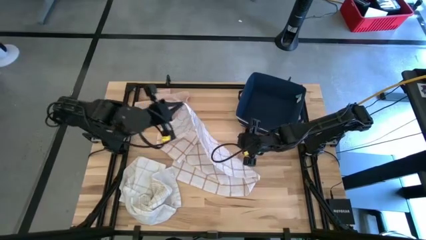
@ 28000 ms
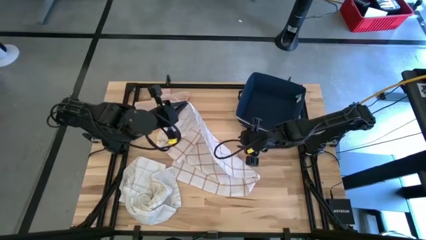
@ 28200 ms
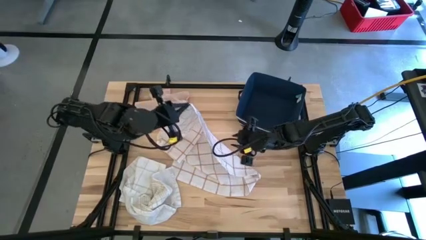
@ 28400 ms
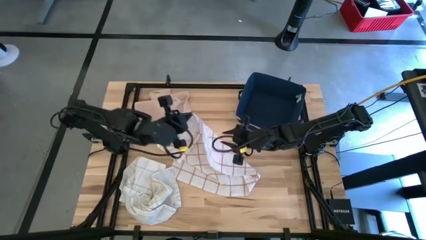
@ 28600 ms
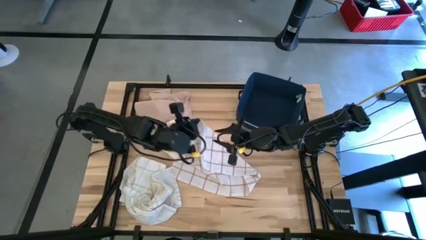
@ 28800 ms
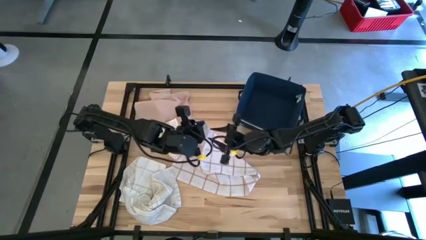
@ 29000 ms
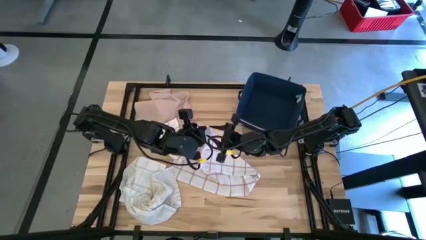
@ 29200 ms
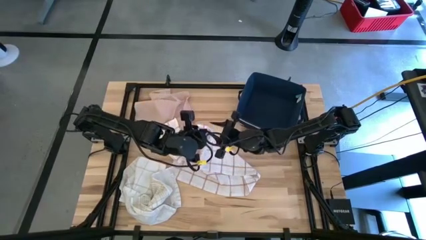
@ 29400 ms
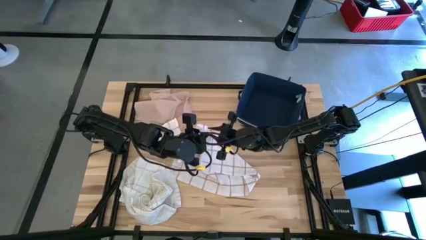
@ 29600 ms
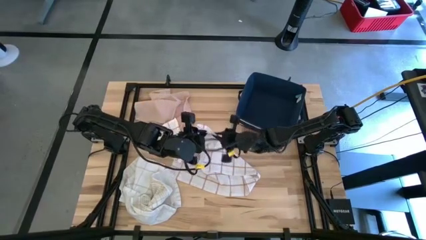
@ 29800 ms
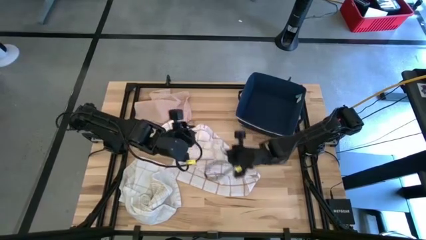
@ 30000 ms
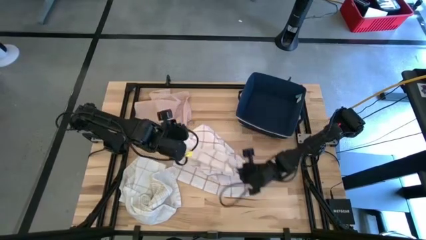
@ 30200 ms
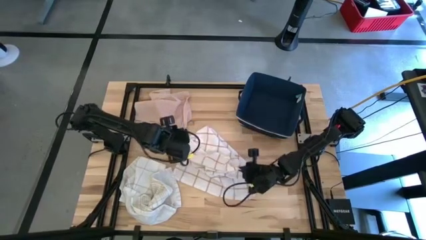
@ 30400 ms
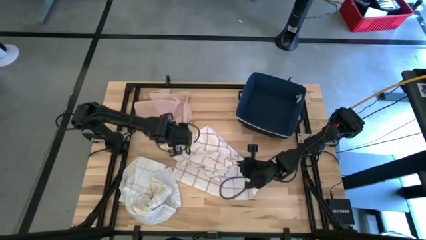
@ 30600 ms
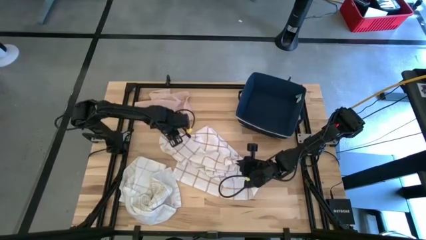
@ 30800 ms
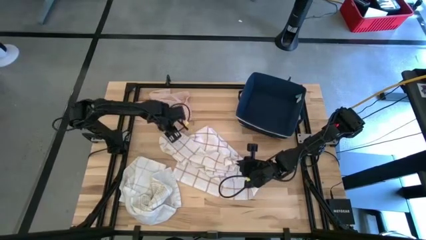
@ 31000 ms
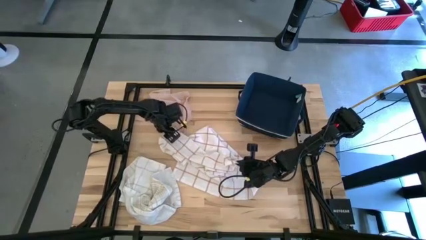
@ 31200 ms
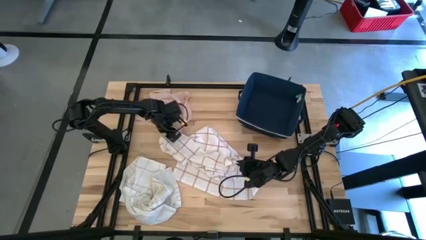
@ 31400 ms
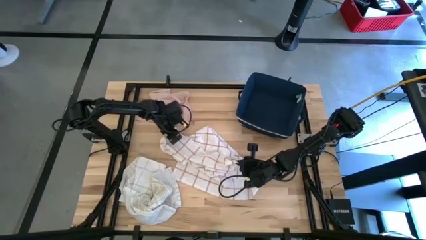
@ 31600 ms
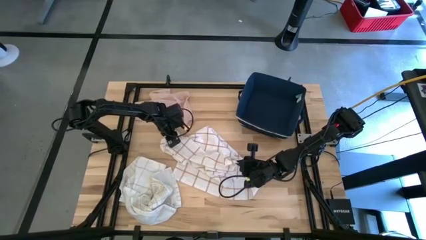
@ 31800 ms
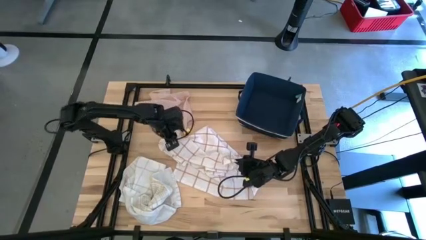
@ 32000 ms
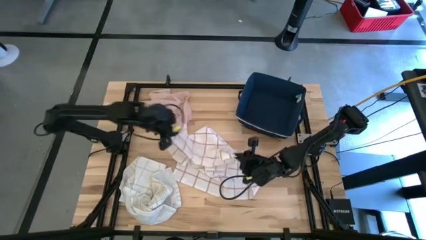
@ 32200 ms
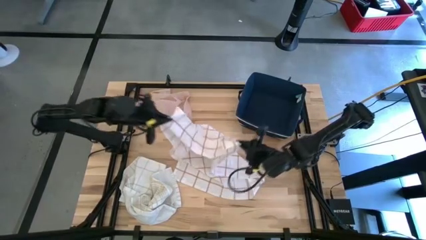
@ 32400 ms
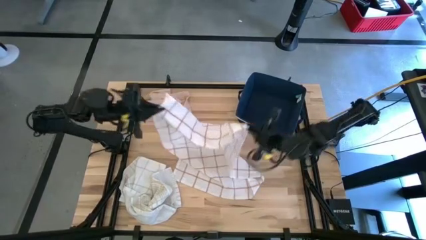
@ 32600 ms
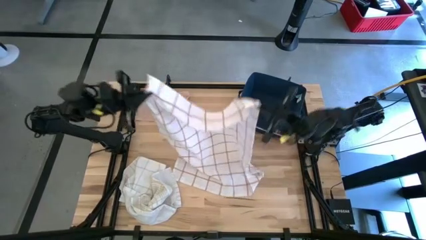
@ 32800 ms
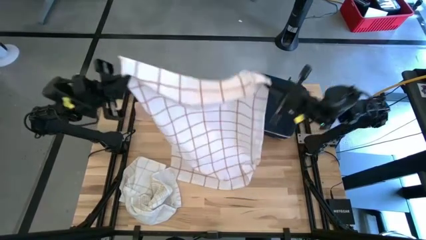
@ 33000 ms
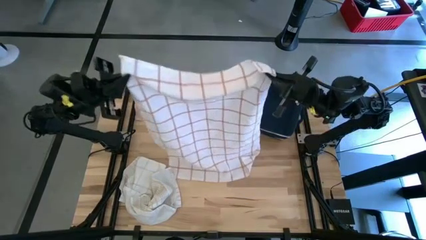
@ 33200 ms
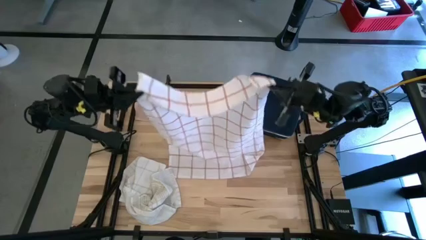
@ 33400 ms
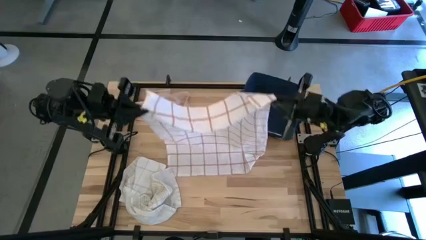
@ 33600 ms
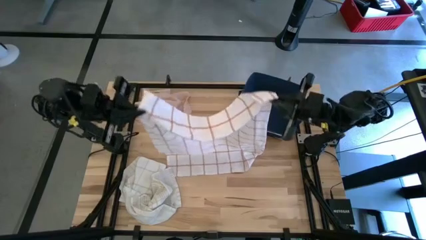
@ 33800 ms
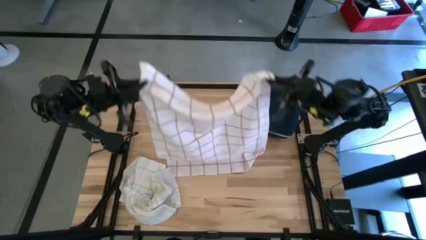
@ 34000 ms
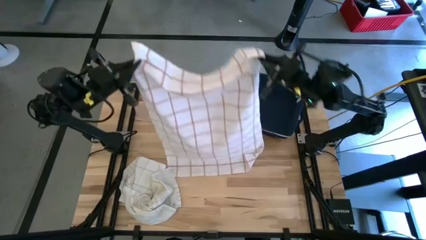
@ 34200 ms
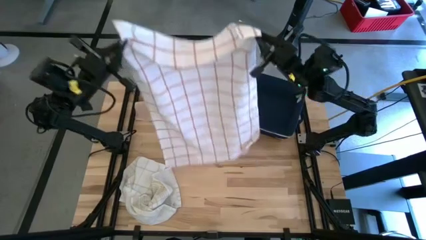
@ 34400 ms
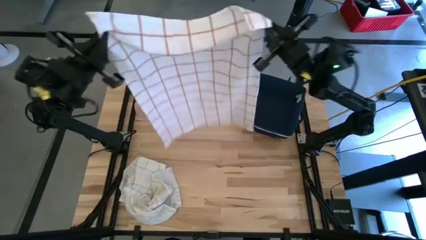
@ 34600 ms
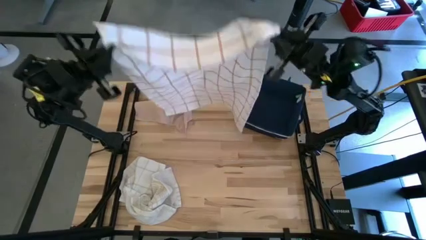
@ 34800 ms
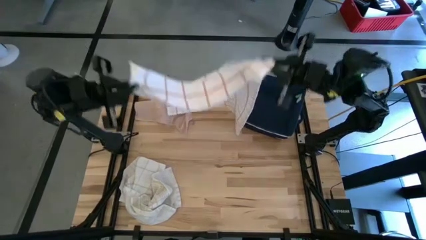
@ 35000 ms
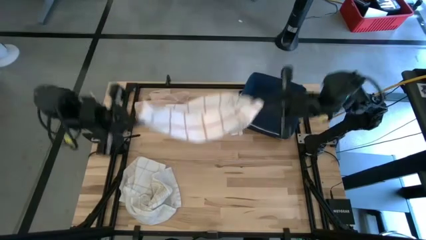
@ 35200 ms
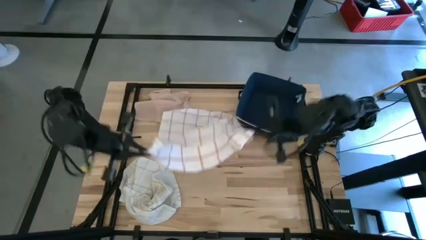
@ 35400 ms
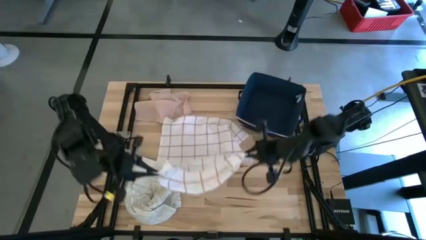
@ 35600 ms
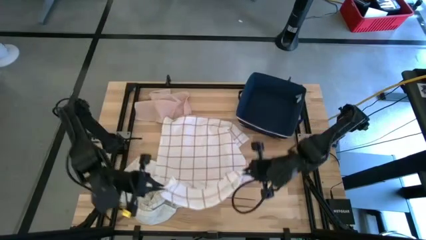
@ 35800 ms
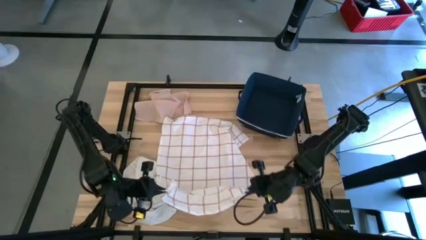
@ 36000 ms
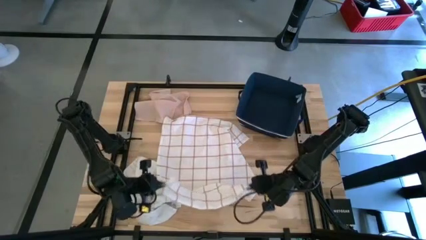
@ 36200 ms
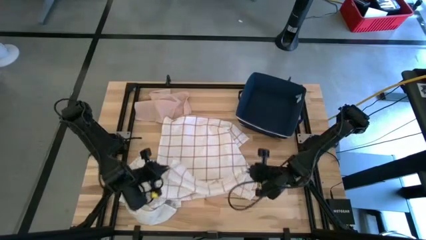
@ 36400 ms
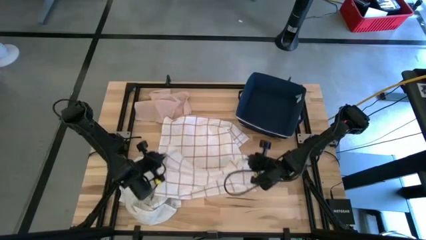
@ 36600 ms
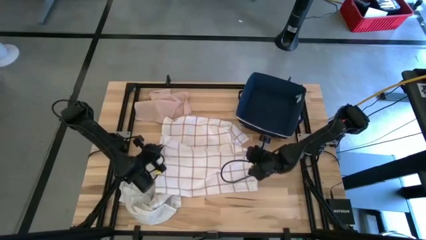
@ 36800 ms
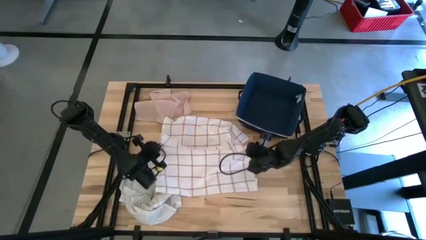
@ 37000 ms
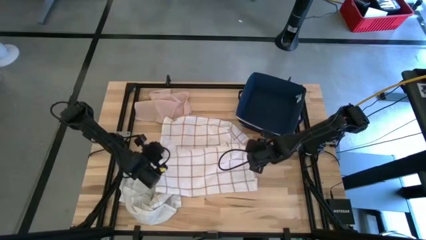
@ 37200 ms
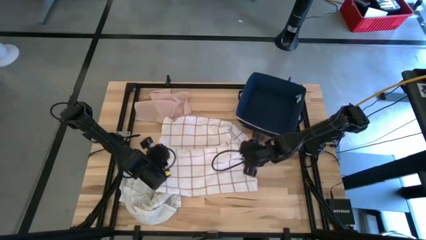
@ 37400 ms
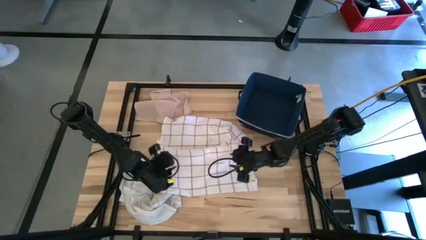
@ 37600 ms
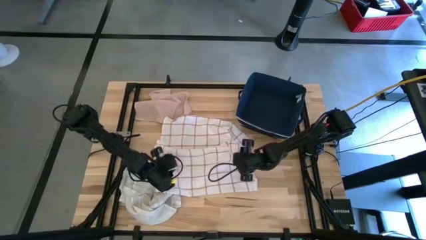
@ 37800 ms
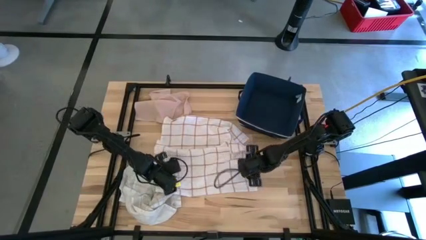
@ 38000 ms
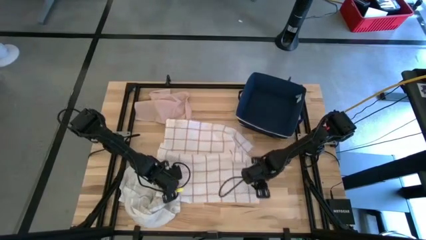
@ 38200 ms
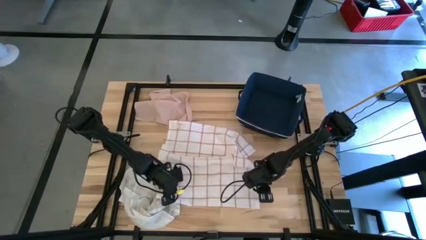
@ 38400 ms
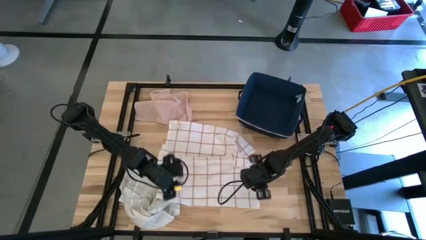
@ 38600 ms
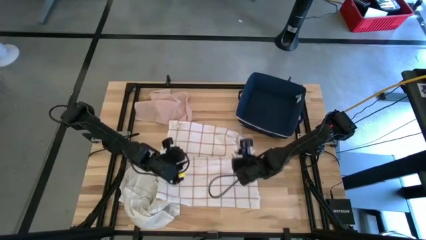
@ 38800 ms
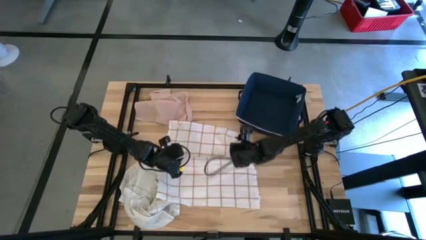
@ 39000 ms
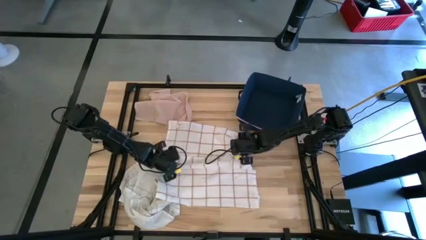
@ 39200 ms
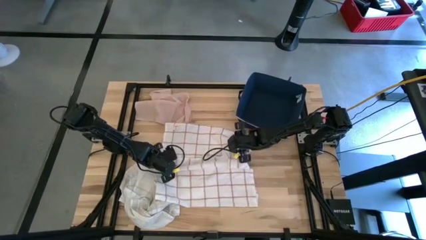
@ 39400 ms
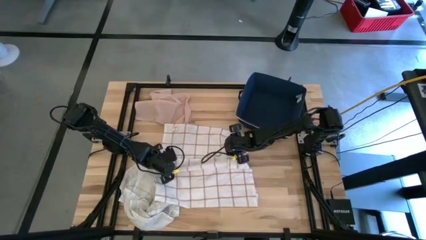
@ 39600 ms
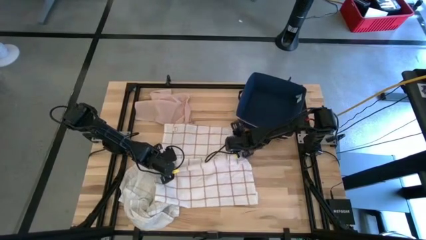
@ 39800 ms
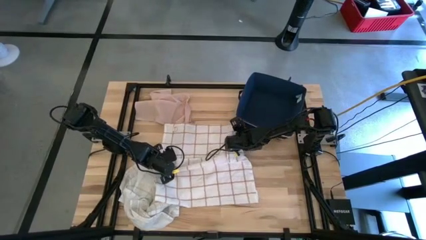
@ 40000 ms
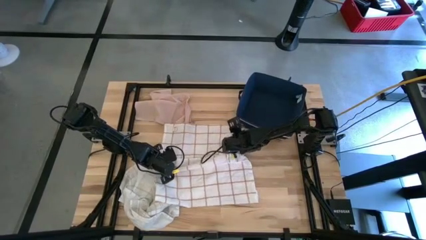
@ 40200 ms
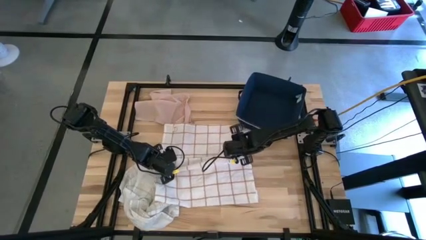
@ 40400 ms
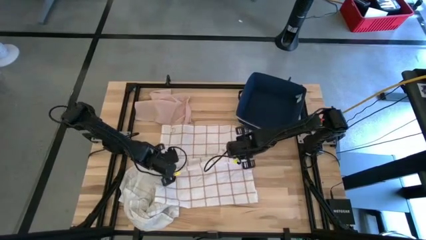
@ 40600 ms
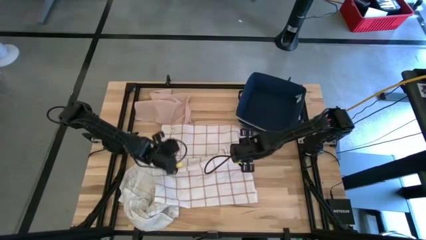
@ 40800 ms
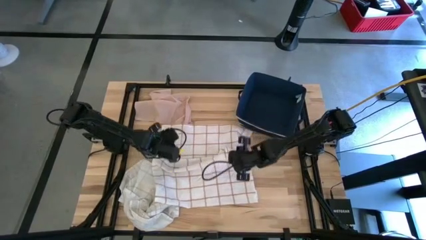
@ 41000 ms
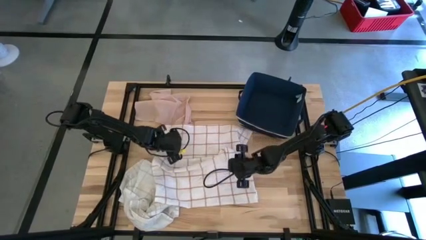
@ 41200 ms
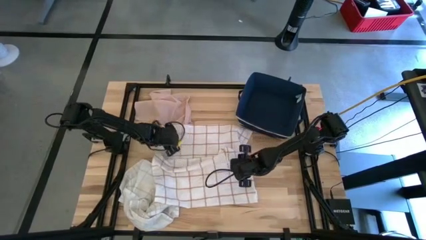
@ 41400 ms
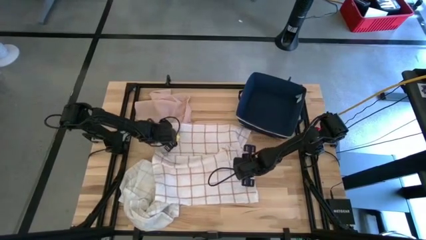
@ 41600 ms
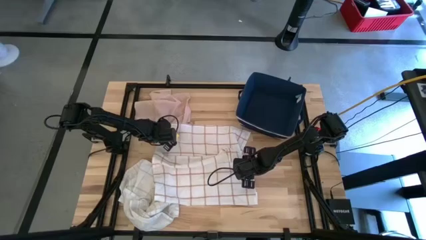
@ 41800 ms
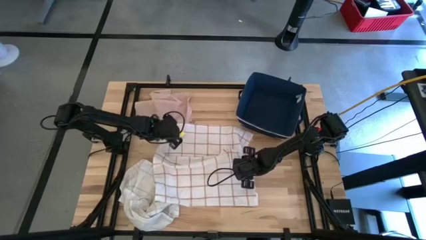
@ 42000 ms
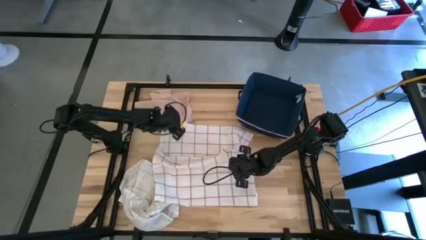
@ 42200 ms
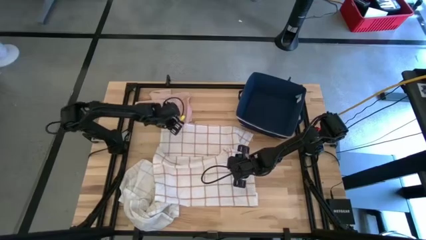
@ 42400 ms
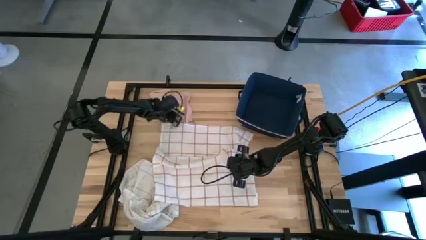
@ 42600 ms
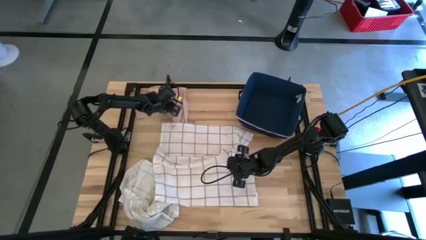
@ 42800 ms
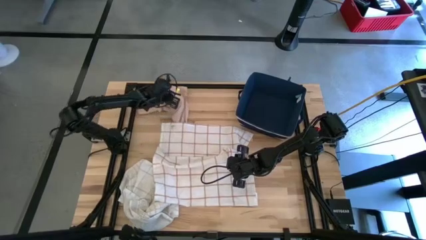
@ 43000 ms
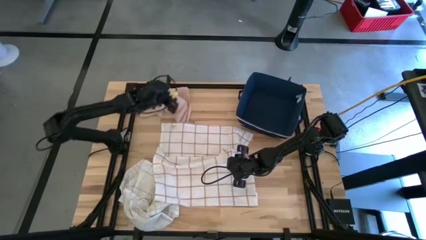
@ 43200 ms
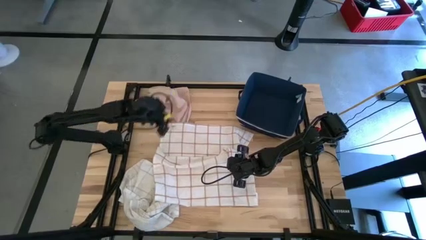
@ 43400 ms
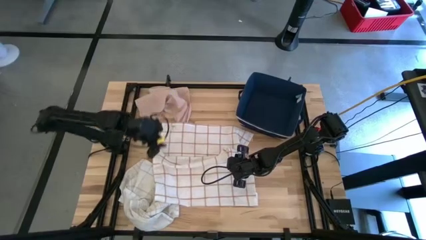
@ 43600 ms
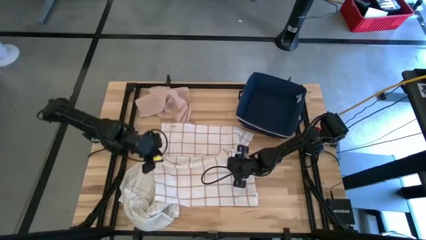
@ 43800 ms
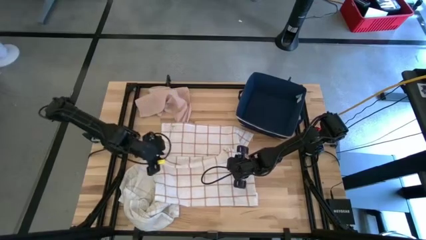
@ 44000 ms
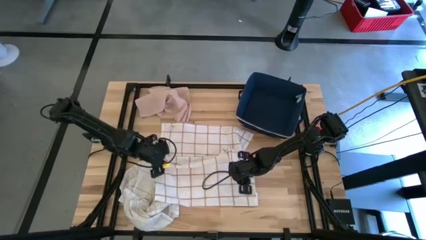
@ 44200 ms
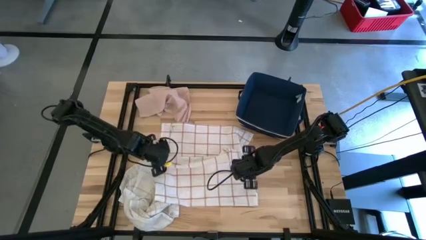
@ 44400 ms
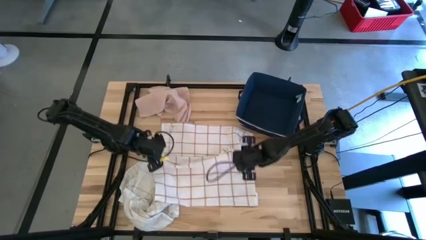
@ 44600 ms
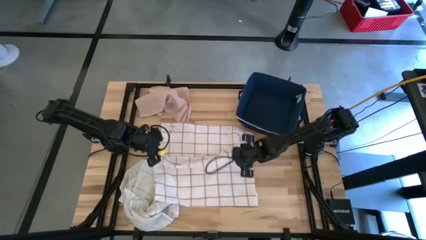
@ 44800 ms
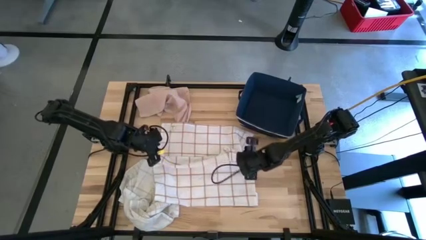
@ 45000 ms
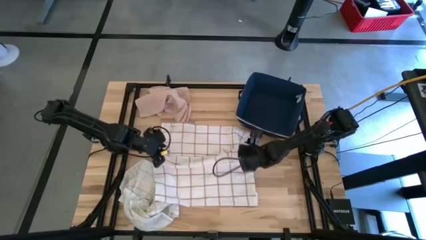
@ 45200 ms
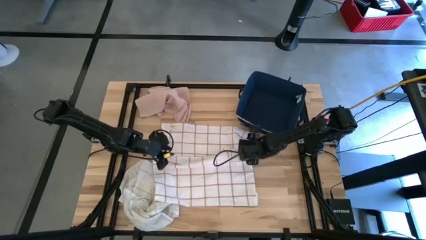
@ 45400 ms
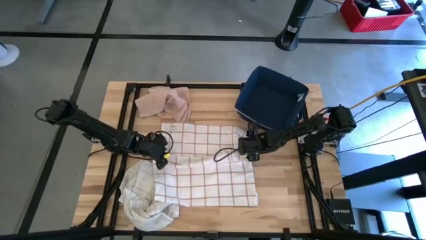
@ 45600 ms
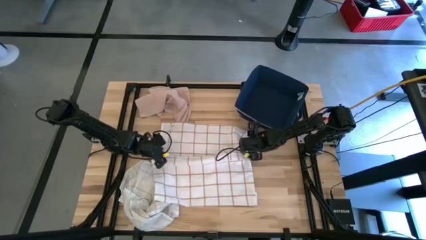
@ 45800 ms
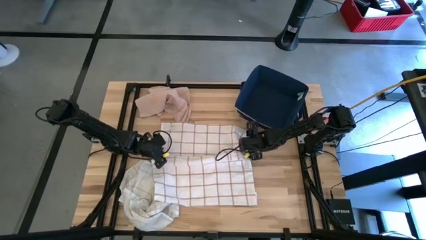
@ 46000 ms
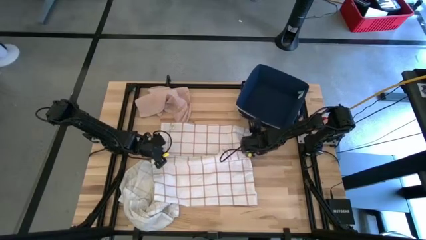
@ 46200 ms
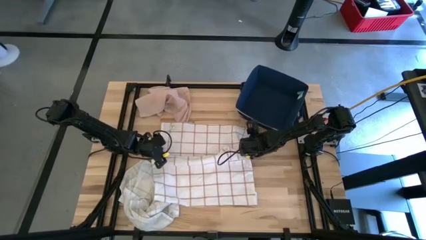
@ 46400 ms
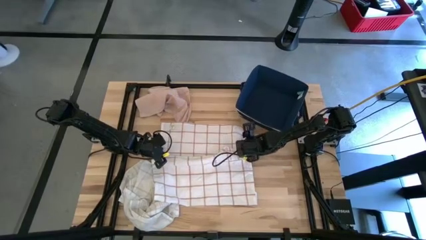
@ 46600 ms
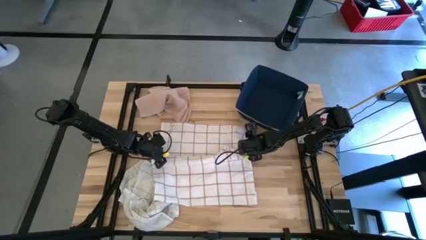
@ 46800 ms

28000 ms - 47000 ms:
Task: Fold towel
Fold the white with red-stripe towel
